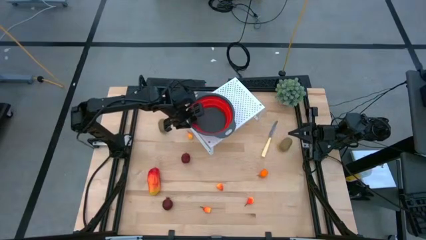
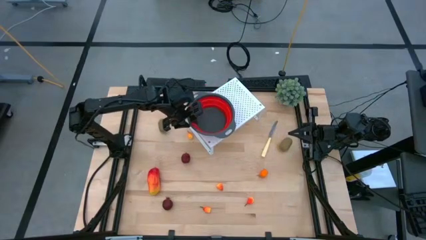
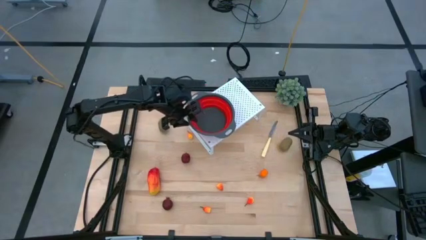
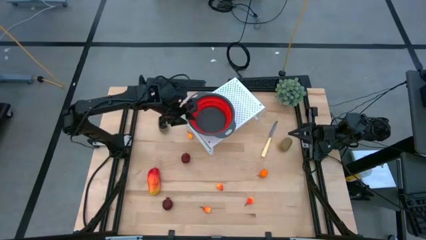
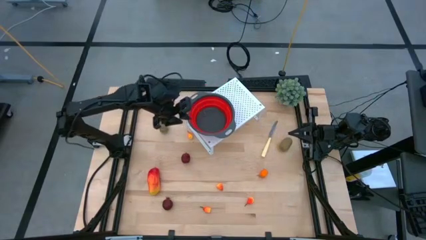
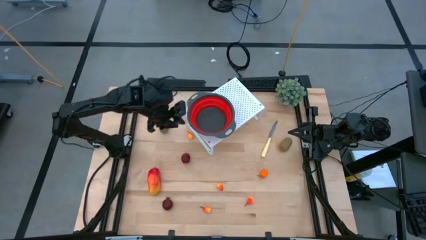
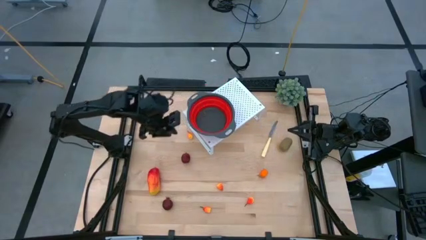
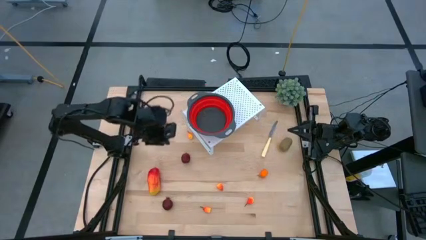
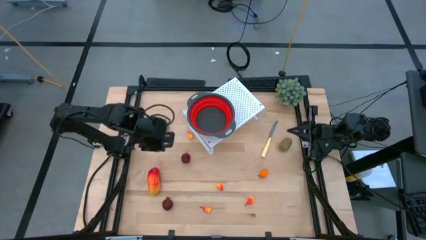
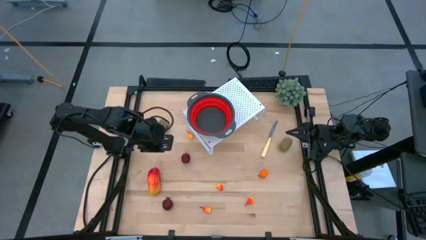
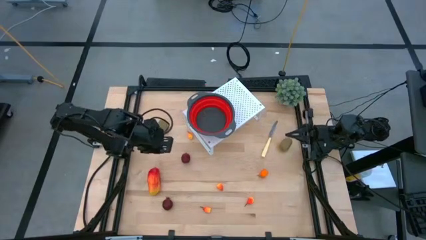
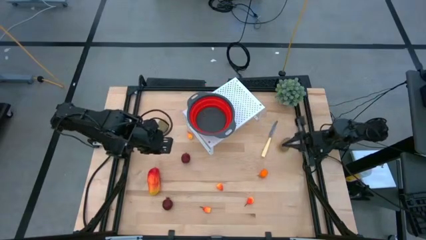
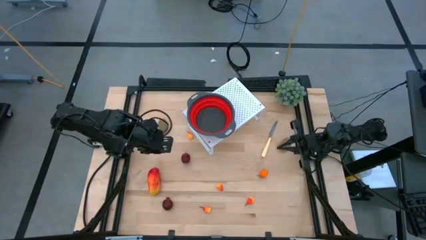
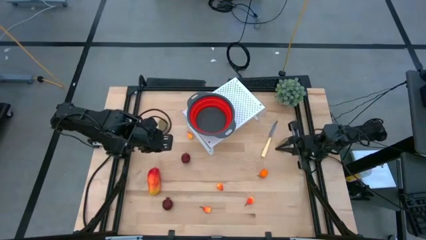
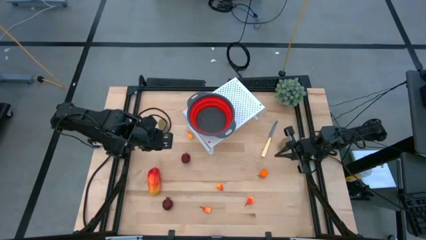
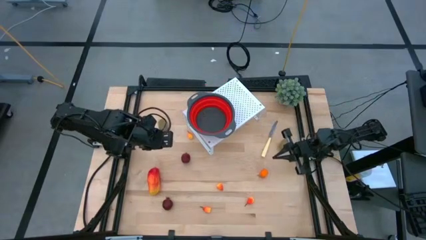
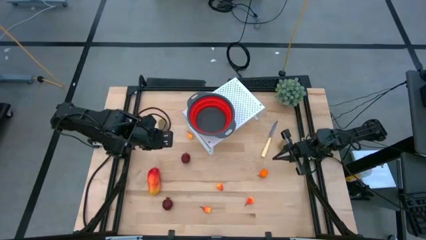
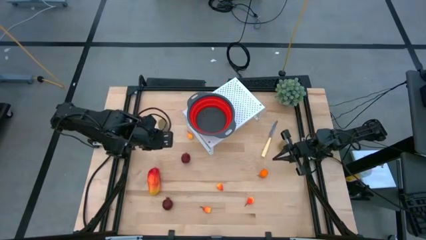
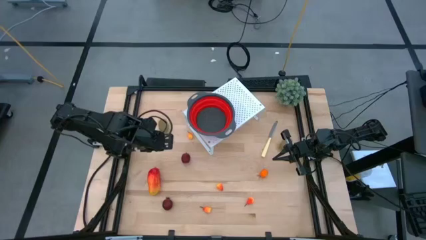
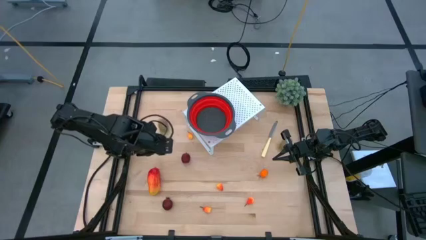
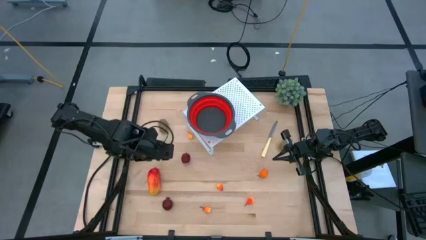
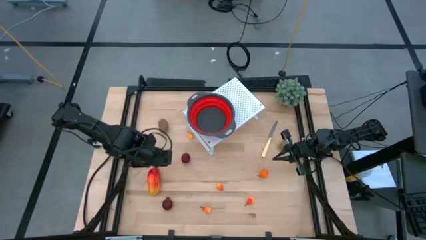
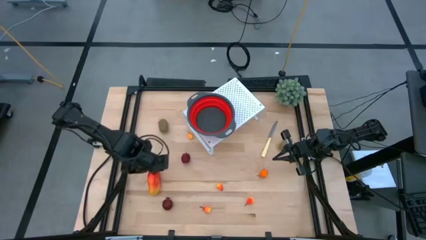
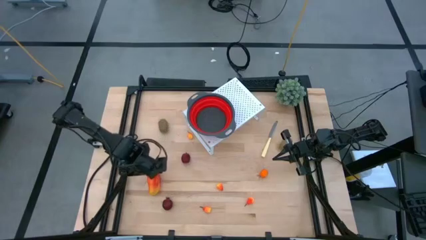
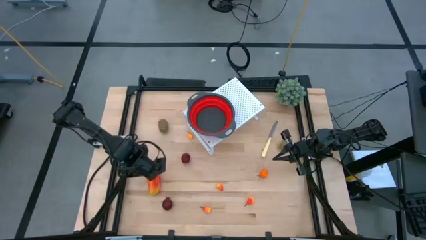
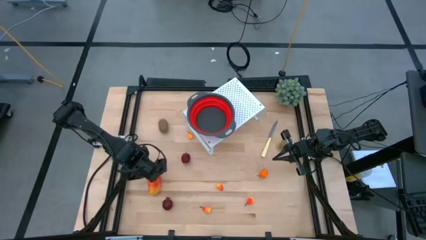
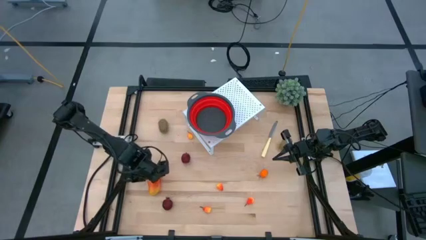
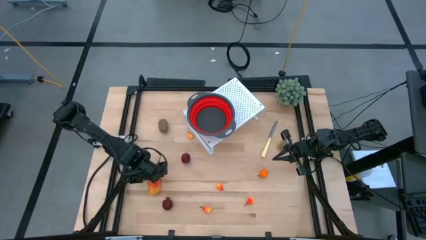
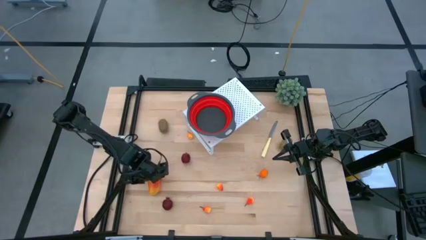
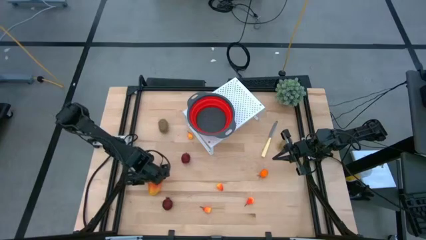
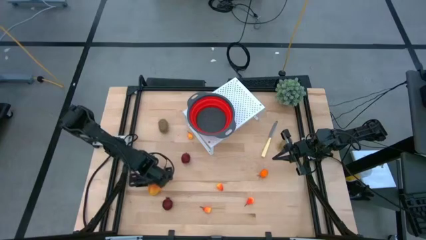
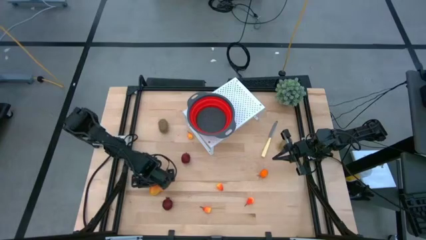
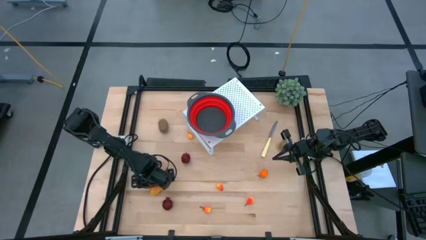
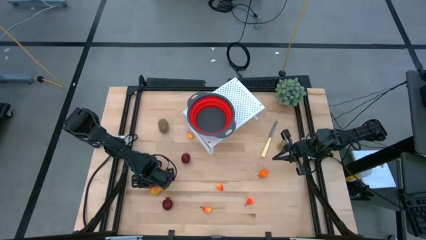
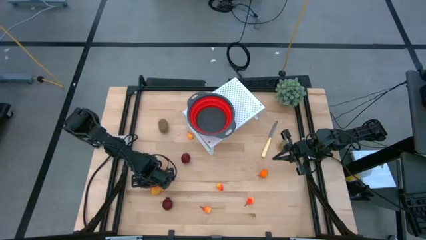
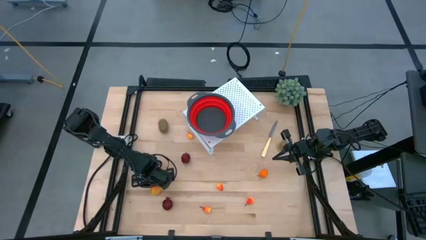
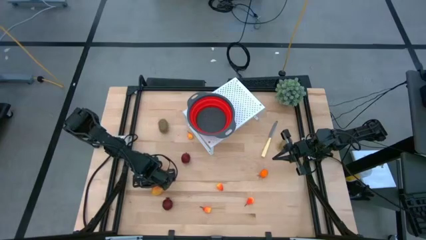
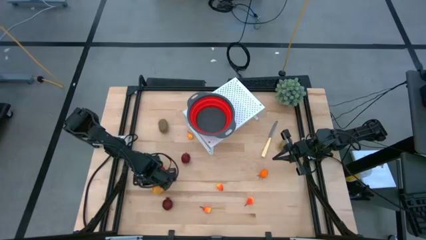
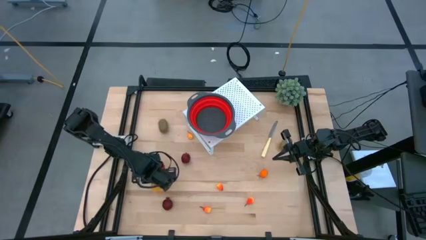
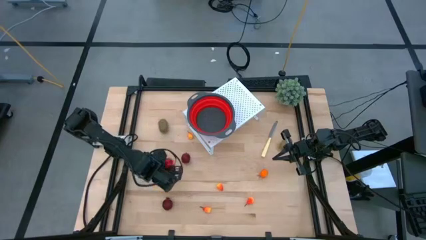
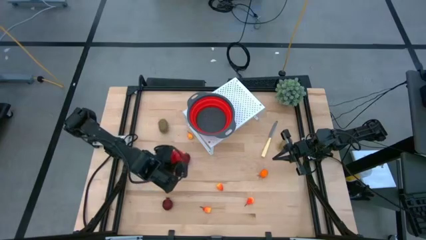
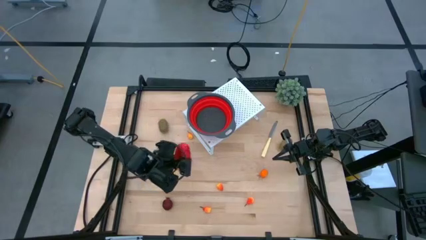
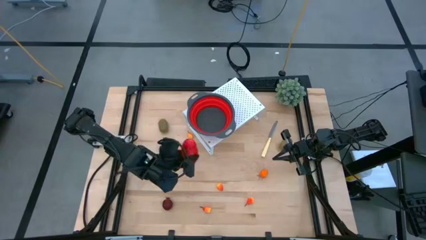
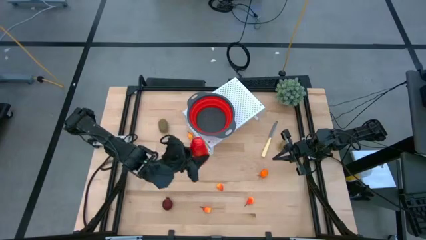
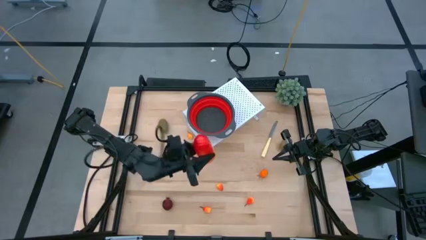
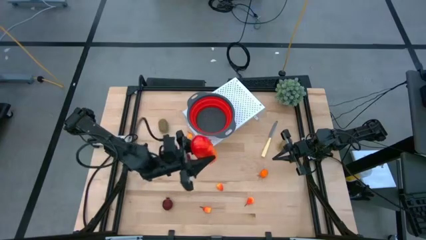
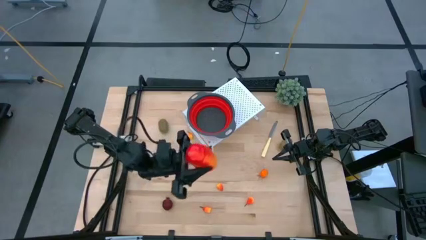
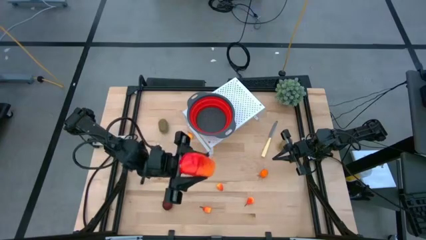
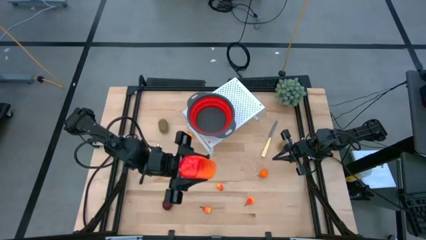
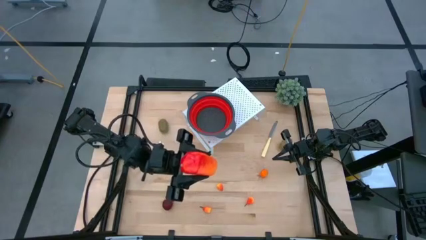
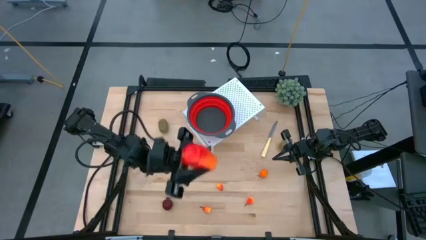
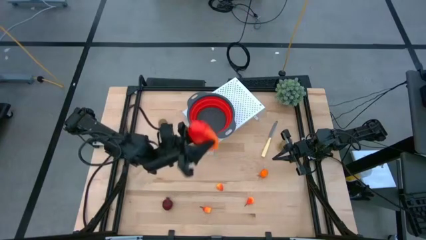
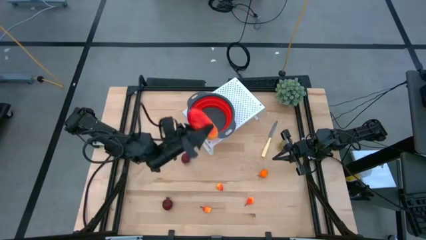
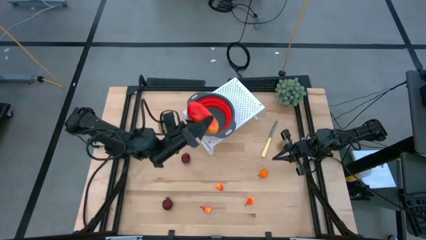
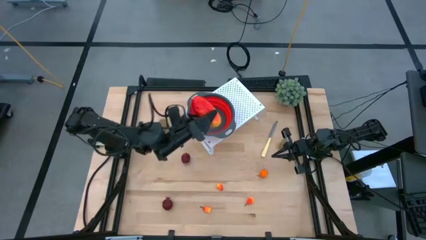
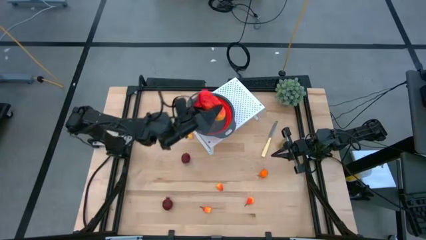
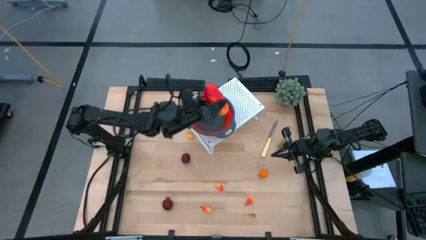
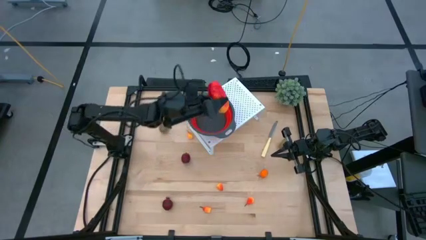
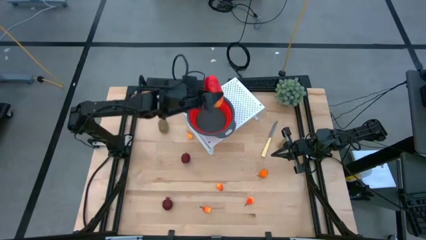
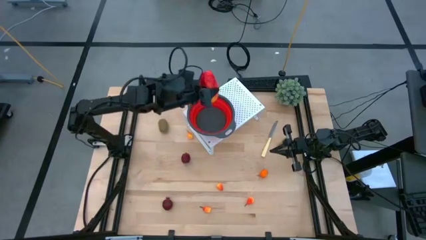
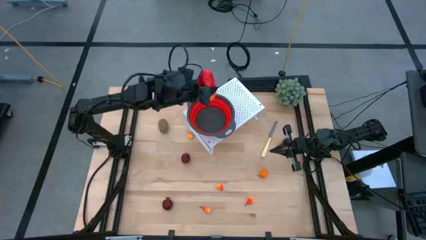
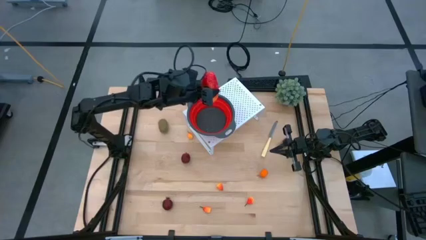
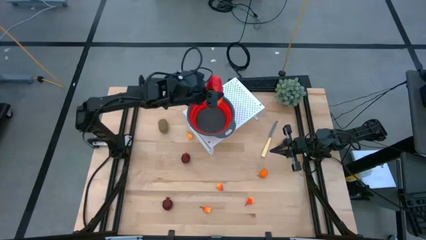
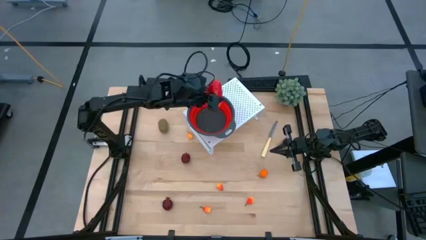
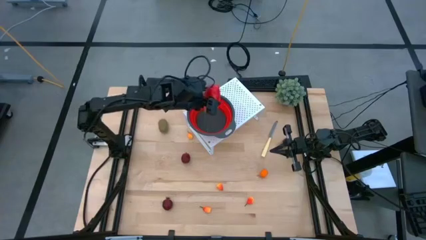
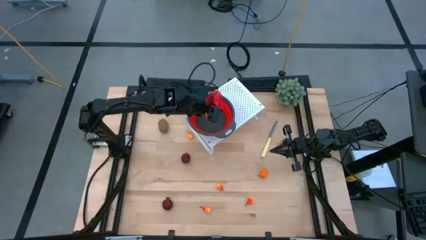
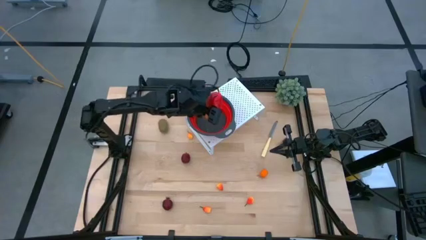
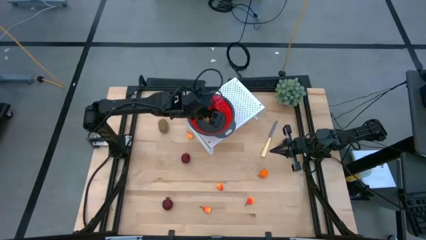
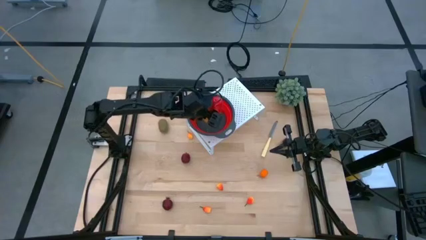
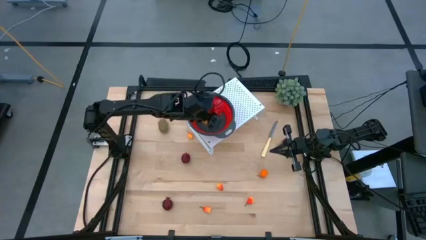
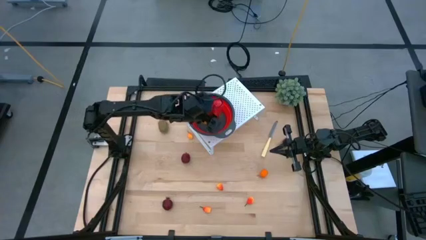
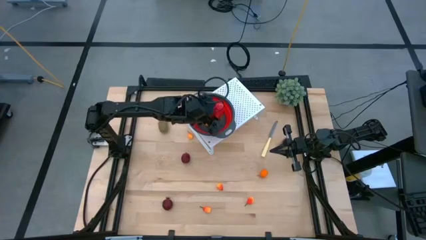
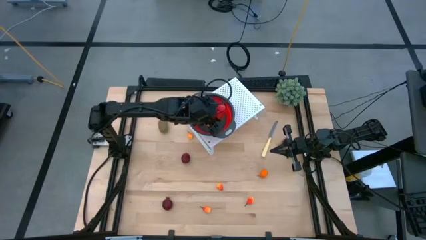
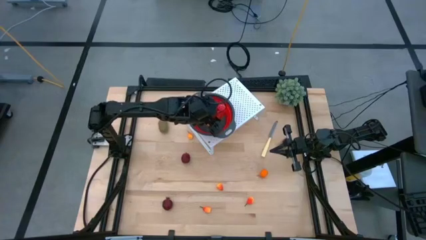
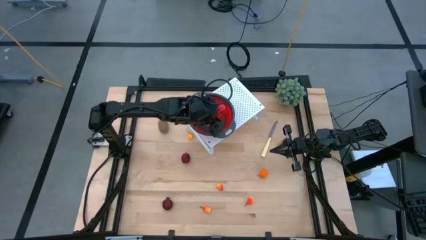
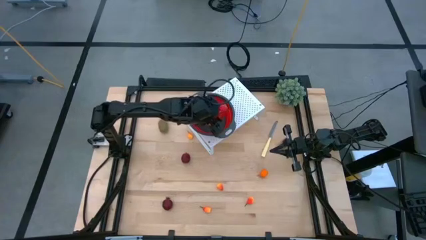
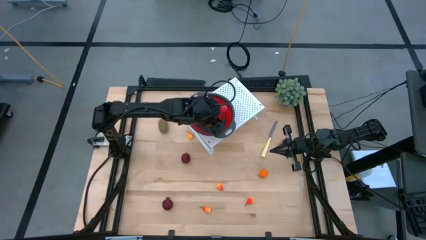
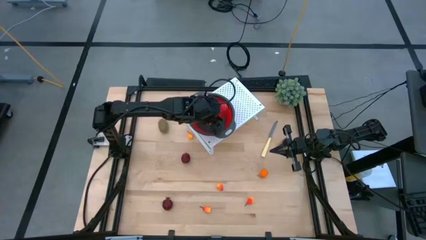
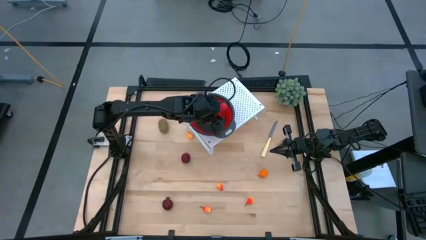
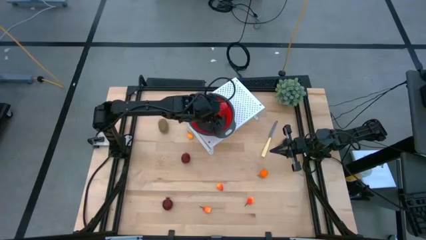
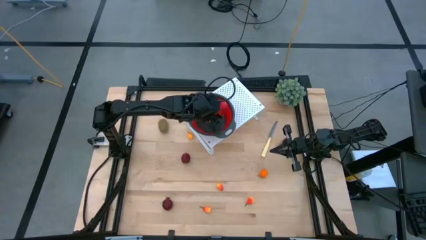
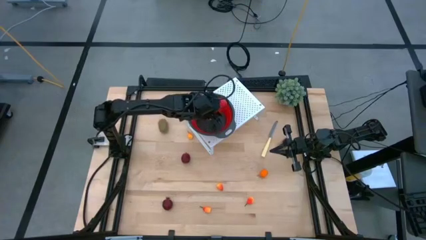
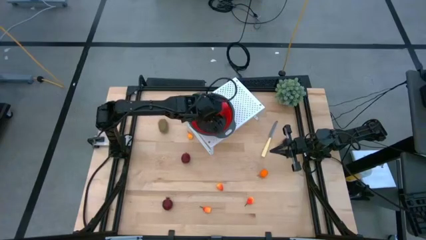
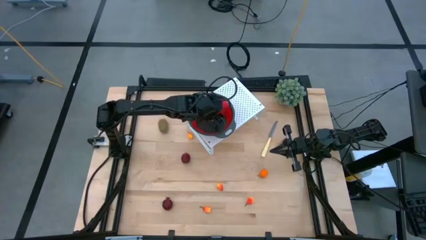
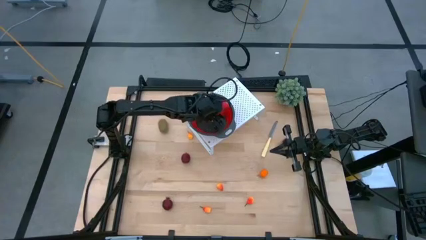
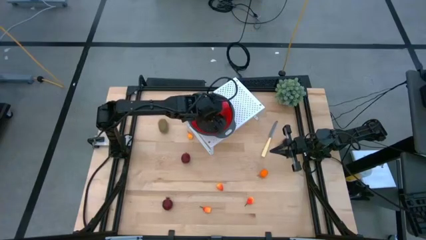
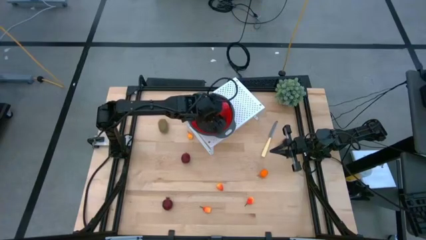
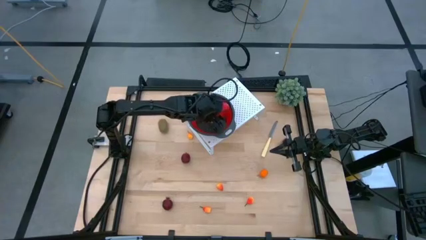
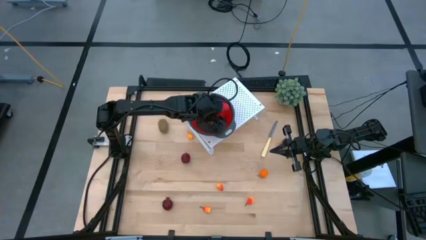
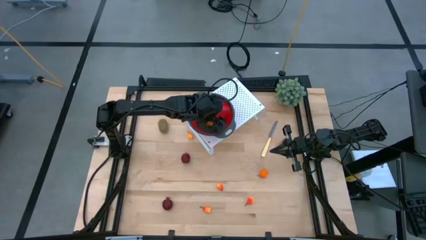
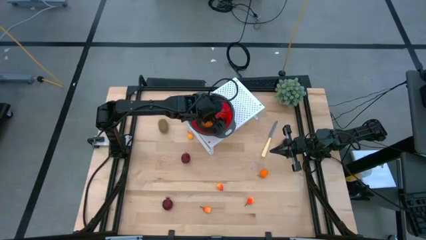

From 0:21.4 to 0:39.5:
Task: Pick & Place Fruit
Put the mango into the red strainer bowl on the shelf
